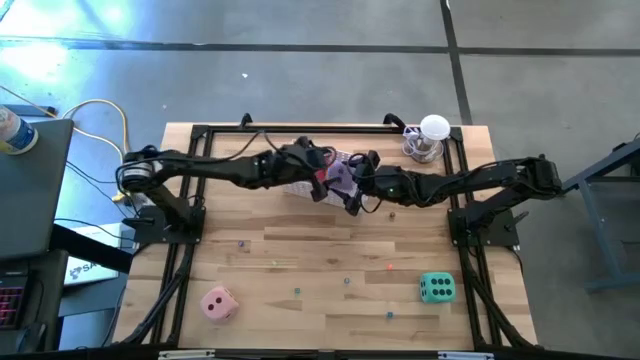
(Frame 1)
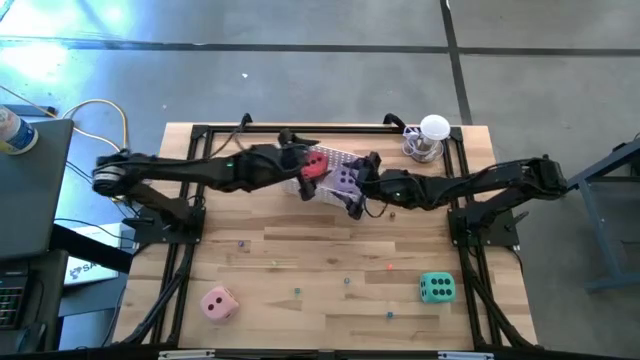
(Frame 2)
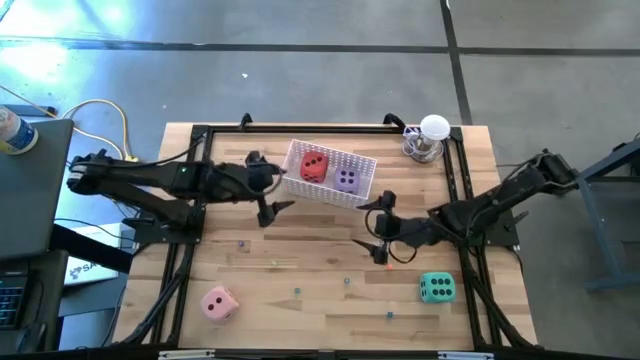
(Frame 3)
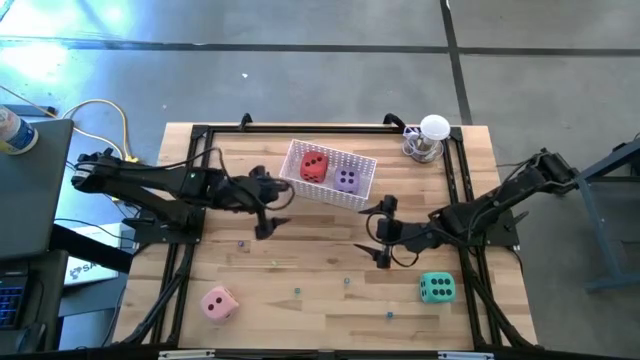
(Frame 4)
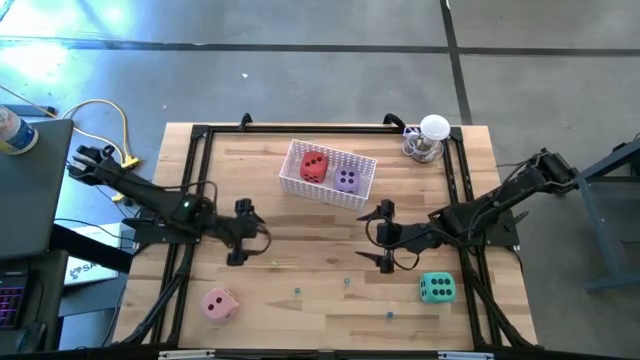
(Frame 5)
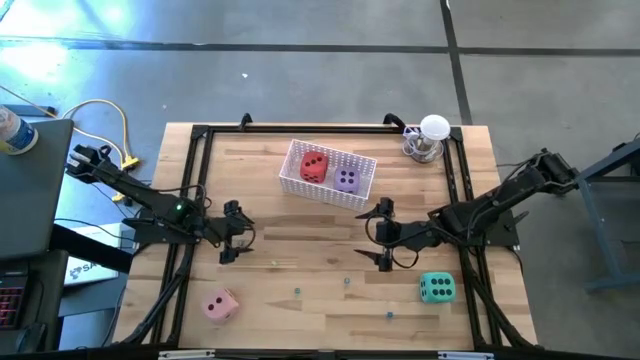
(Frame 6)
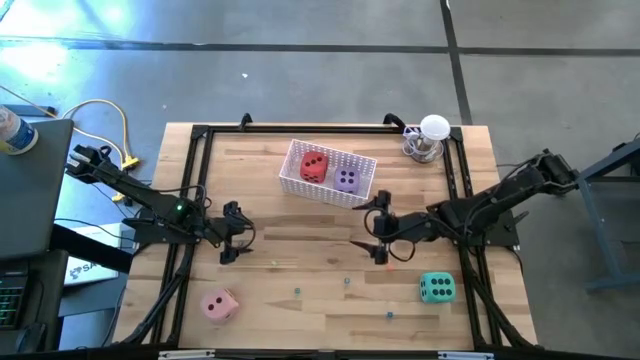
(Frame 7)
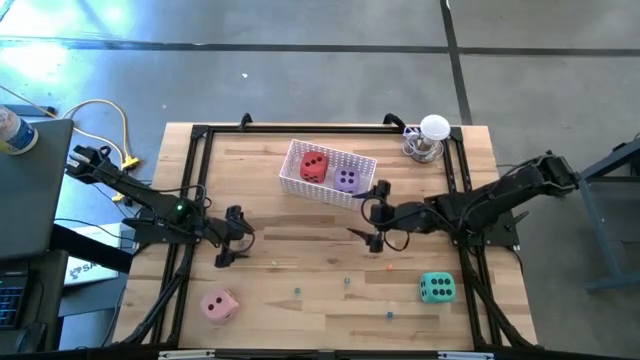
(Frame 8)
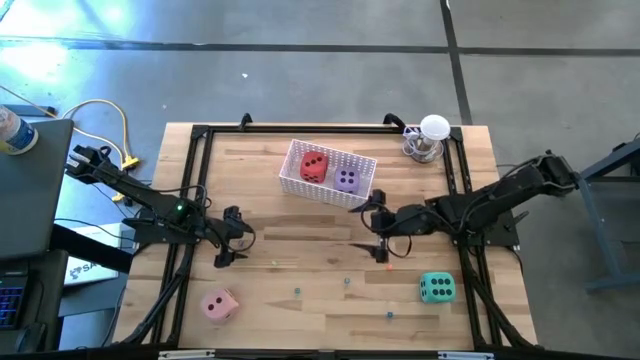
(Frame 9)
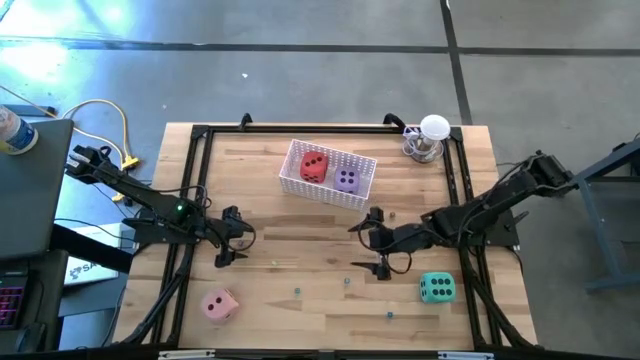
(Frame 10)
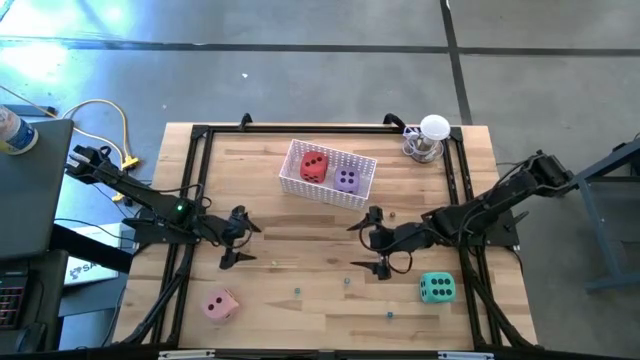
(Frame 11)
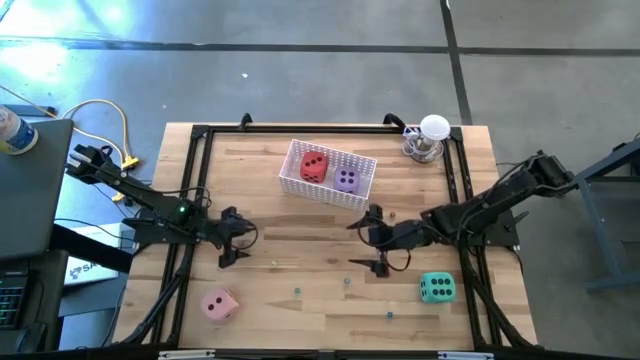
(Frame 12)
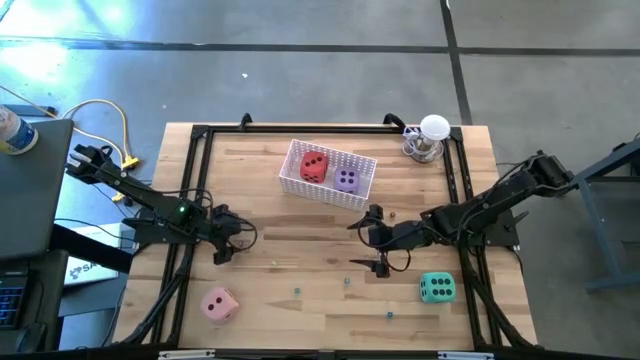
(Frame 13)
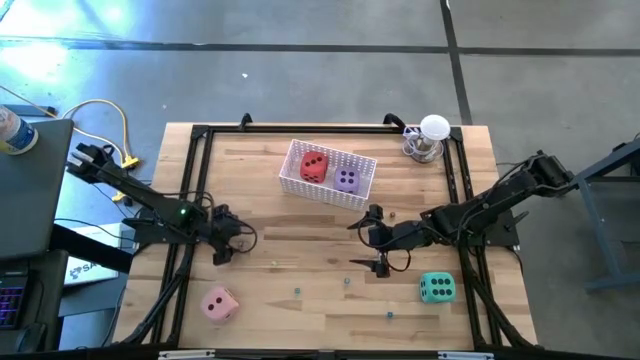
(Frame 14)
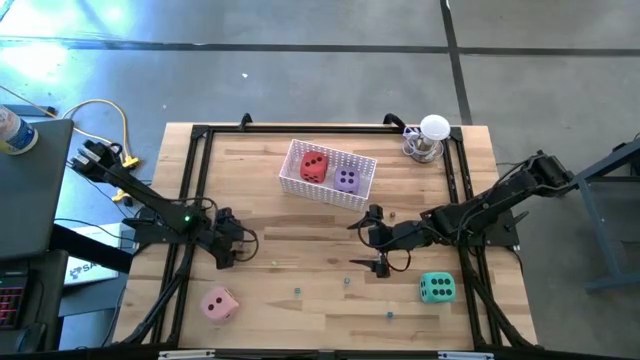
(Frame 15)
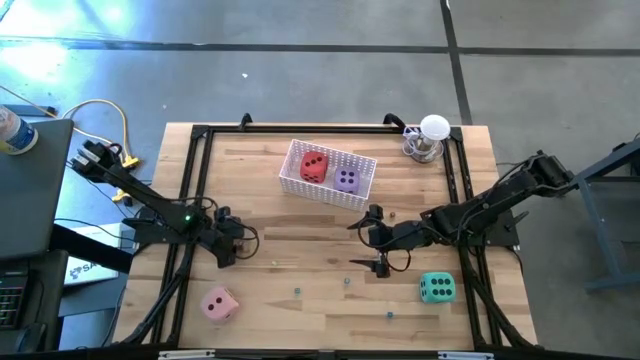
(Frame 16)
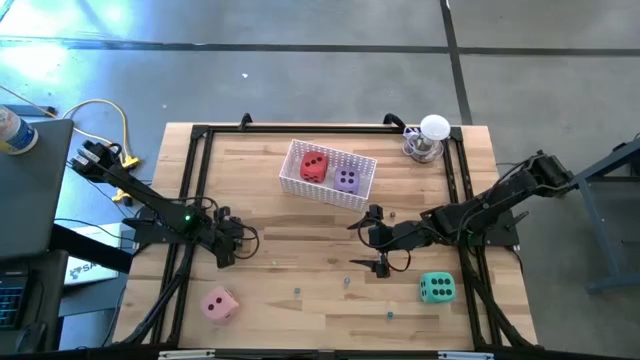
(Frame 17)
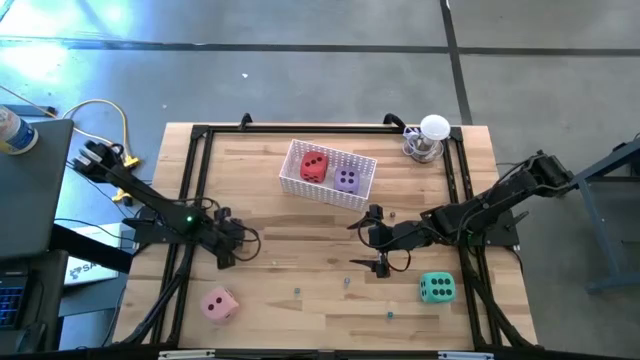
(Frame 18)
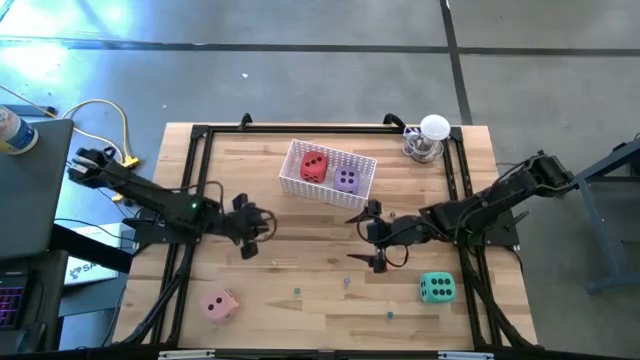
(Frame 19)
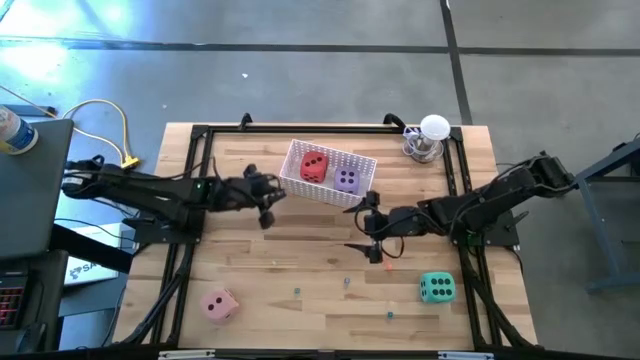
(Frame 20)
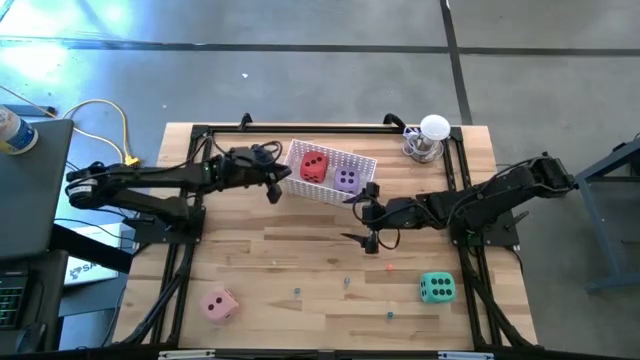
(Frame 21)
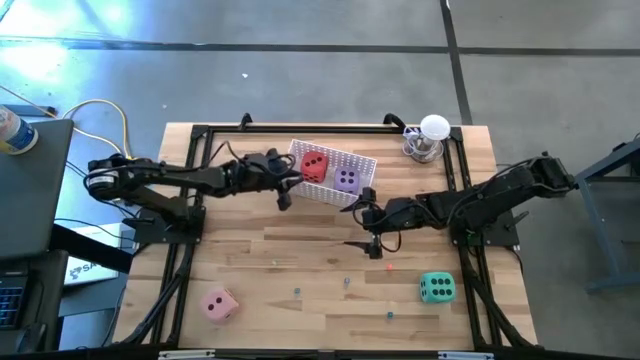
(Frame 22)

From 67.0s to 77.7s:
Task: Pick & Place Dice
Put the small blue die into the white bin

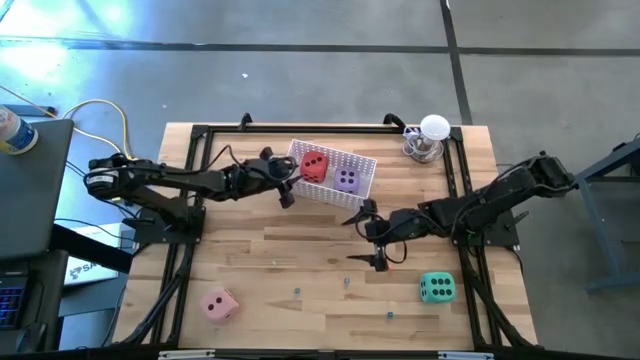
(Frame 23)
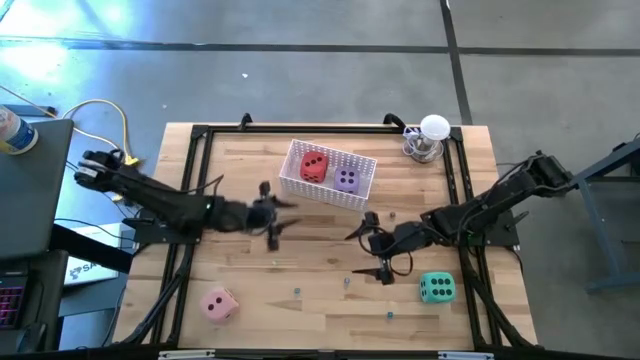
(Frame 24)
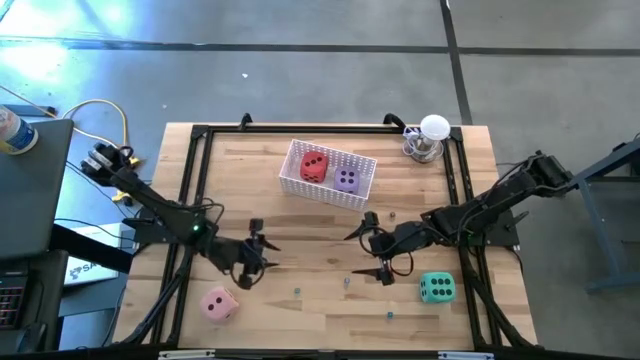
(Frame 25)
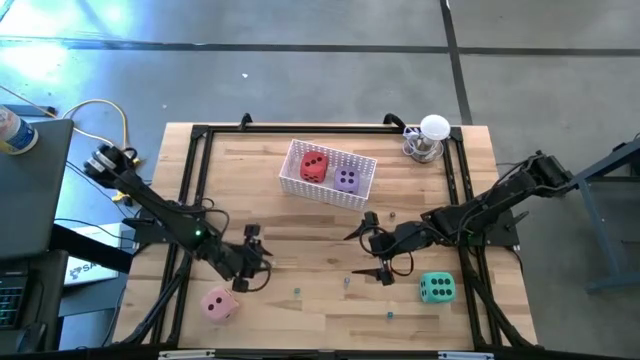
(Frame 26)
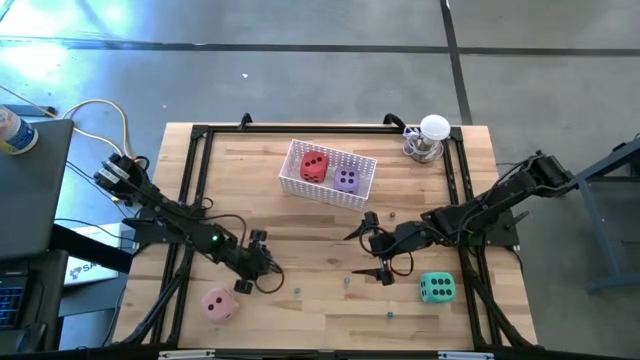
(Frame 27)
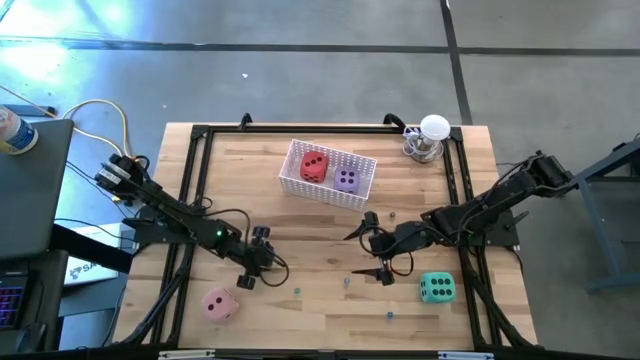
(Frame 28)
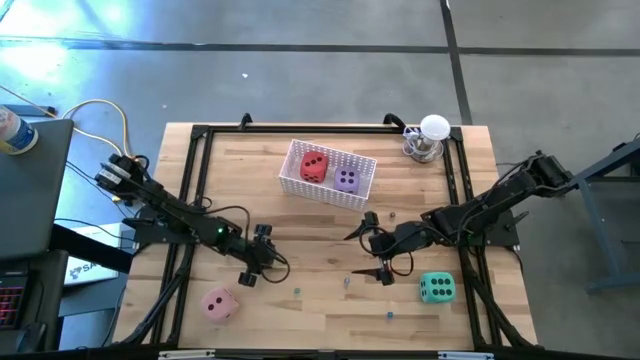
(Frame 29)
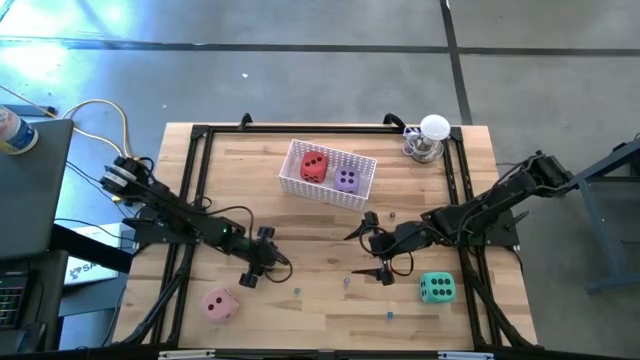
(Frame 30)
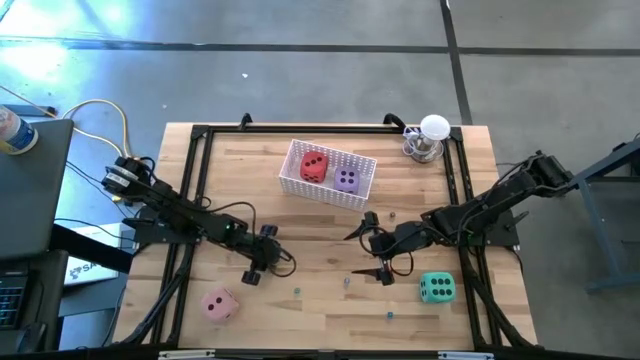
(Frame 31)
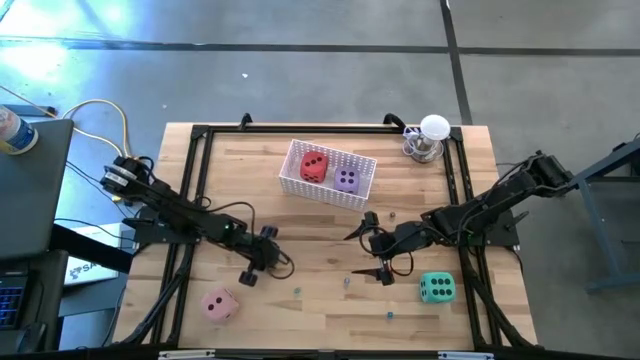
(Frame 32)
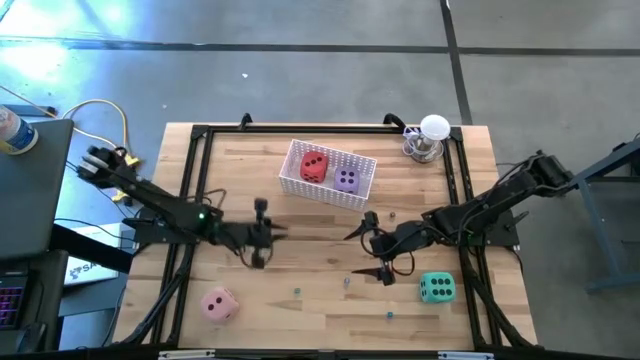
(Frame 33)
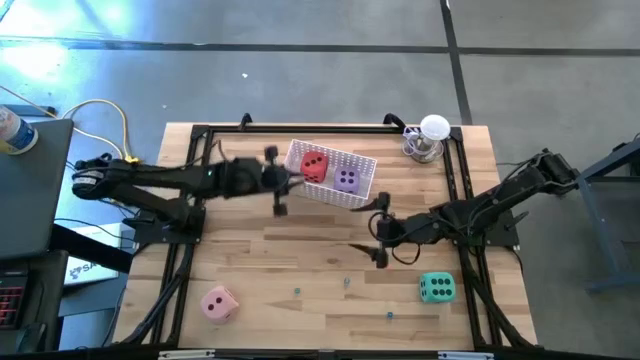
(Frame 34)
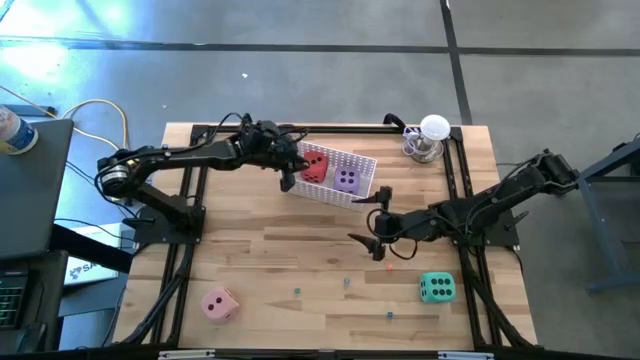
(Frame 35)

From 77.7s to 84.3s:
Put the small light green die into the white bin

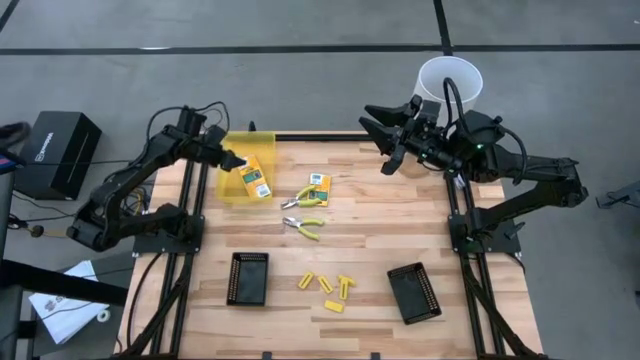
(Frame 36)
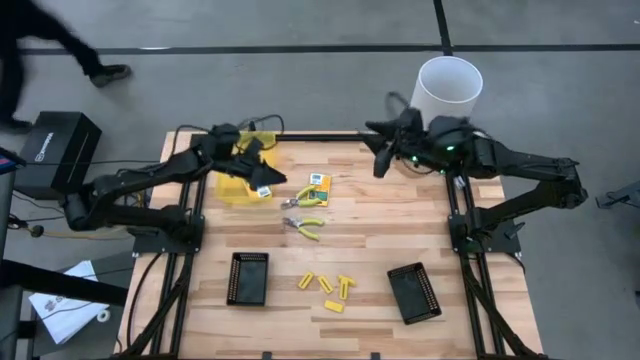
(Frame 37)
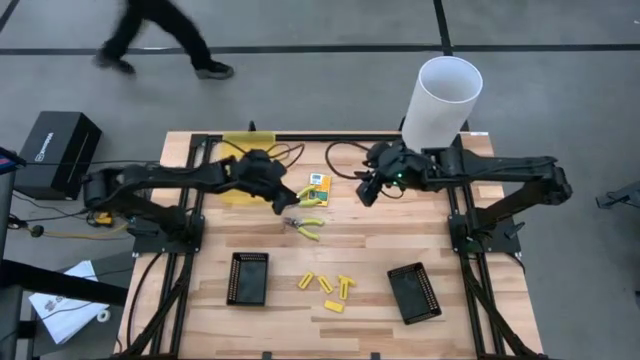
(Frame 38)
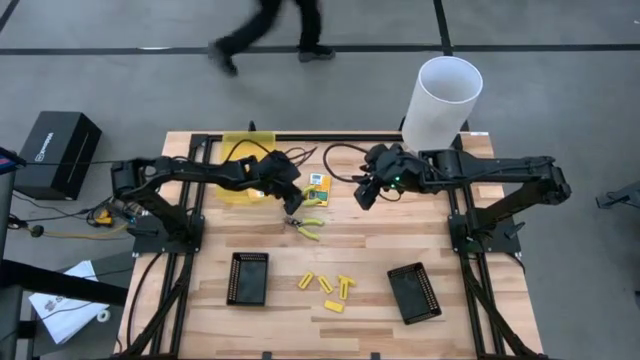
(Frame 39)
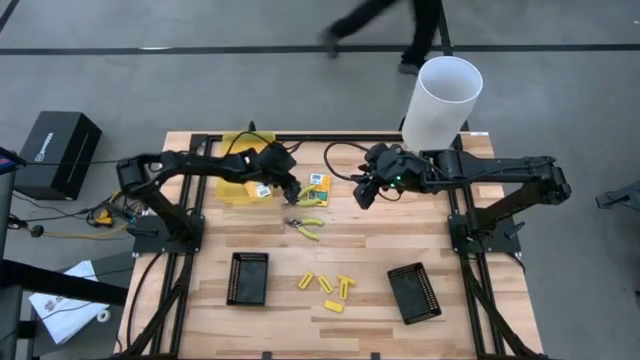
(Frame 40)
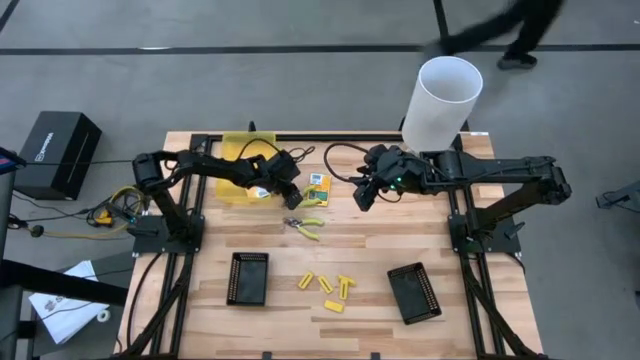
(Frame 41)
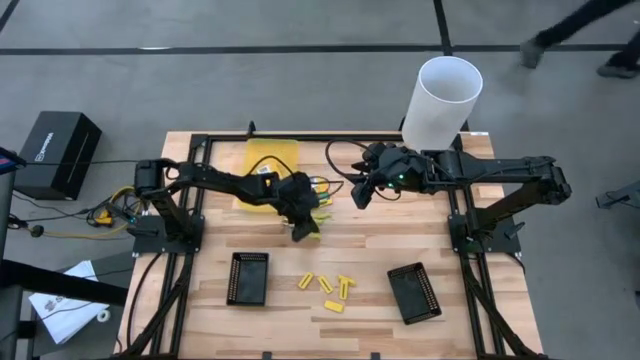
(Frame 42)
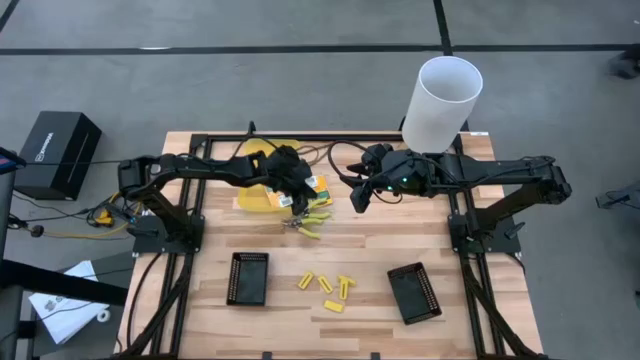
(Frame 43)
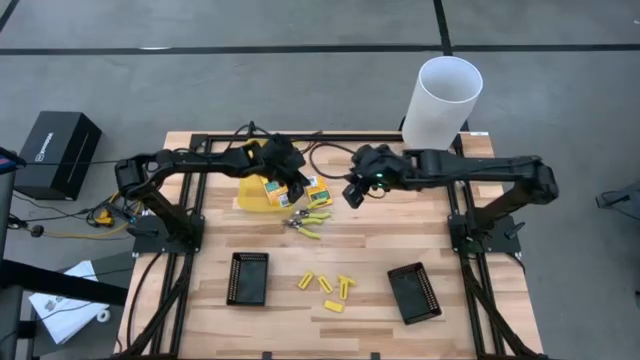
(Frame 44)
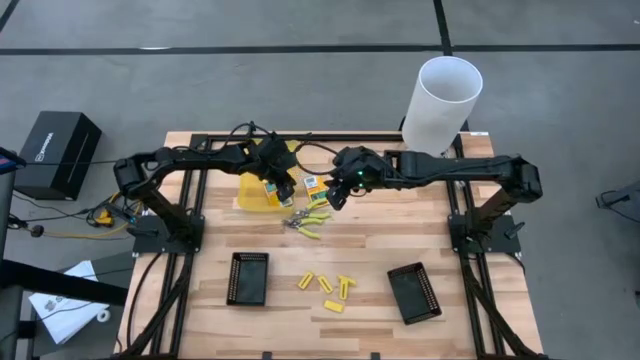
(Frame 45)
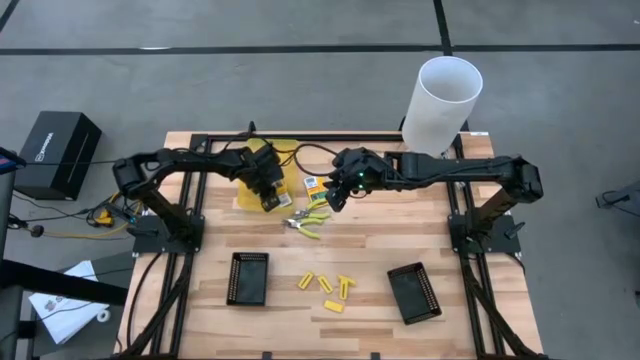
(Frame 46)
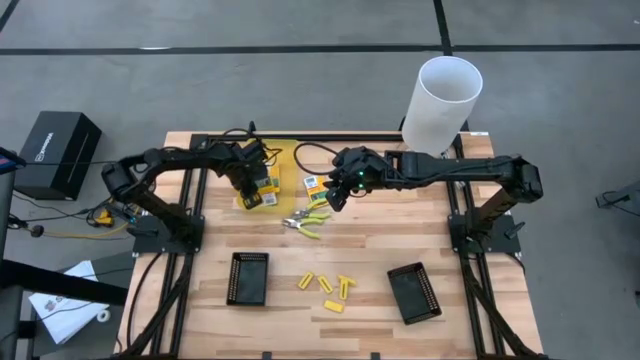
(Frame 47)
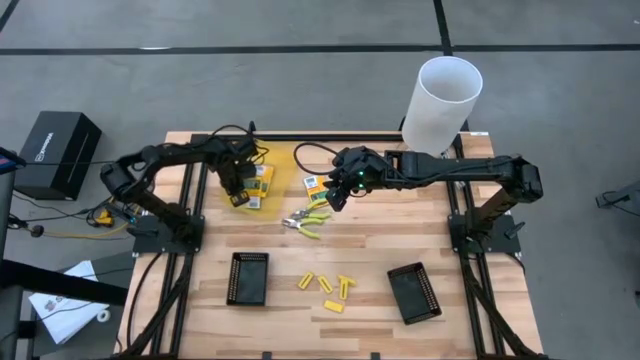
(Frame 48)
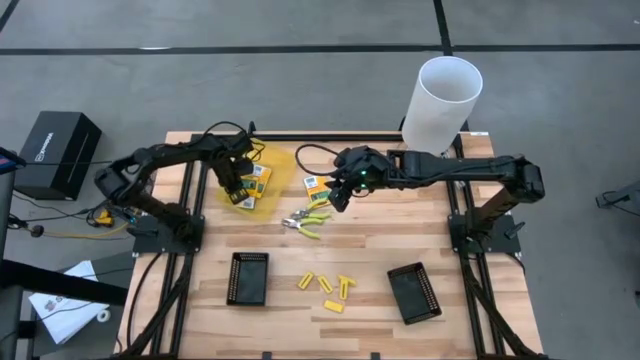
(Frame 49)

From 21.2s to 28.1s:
Task: Pick & Place School Supplies
Adjust the yellow bin
